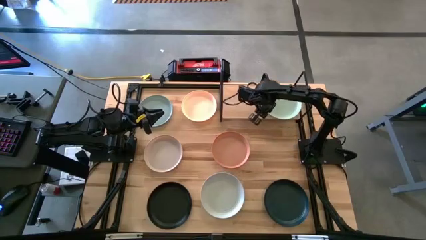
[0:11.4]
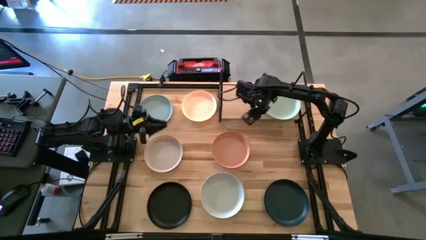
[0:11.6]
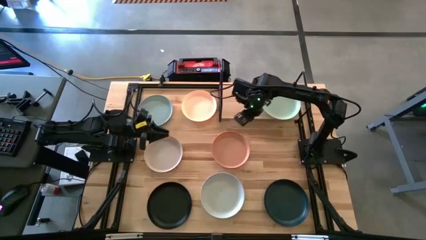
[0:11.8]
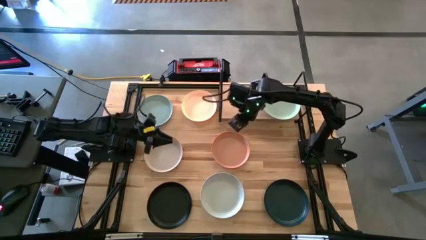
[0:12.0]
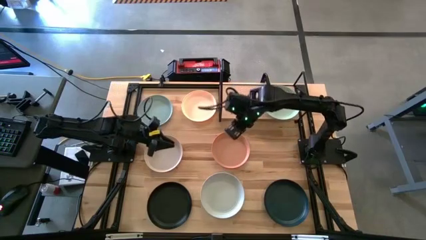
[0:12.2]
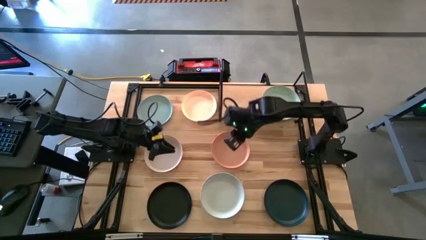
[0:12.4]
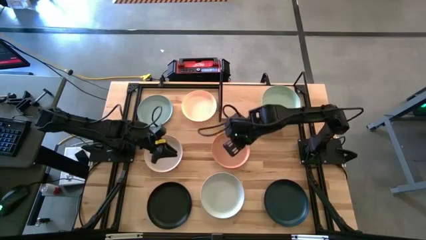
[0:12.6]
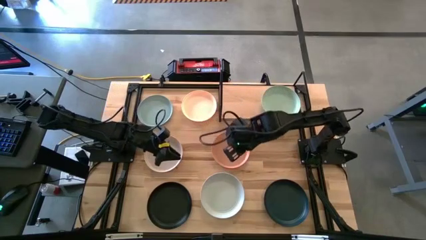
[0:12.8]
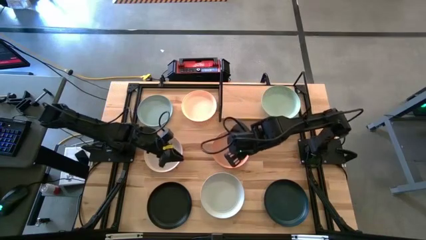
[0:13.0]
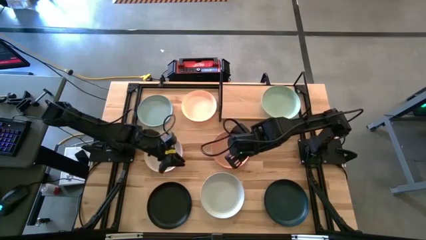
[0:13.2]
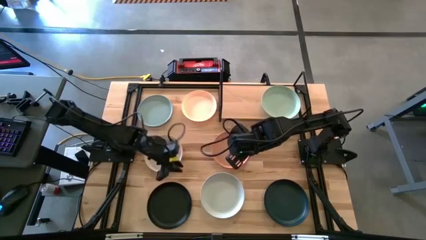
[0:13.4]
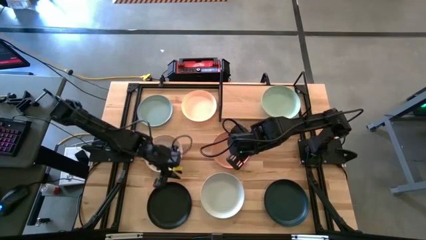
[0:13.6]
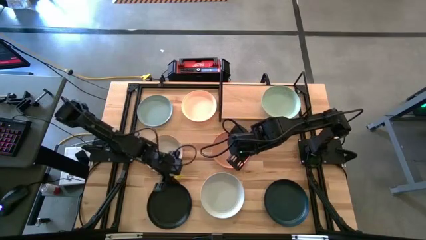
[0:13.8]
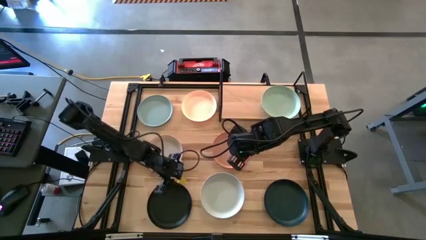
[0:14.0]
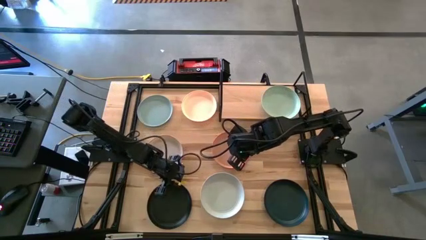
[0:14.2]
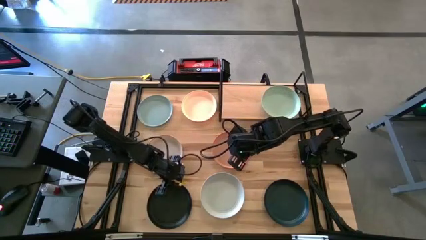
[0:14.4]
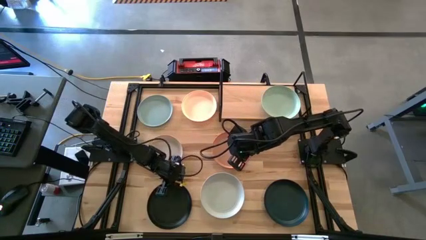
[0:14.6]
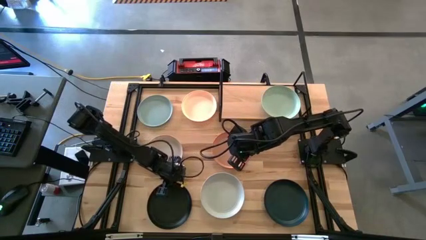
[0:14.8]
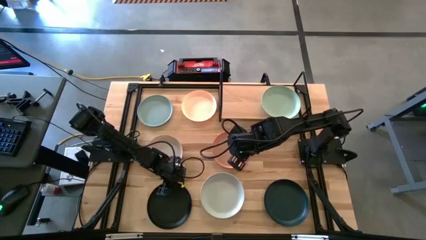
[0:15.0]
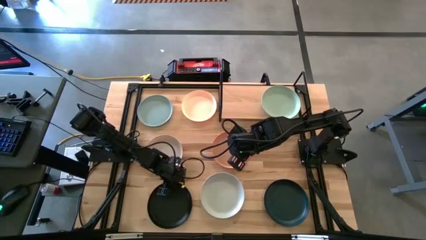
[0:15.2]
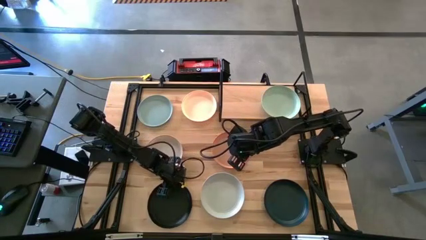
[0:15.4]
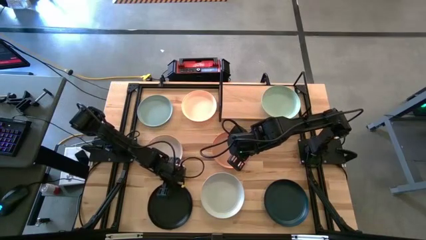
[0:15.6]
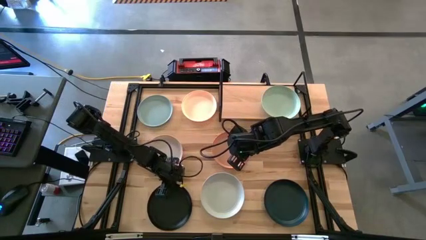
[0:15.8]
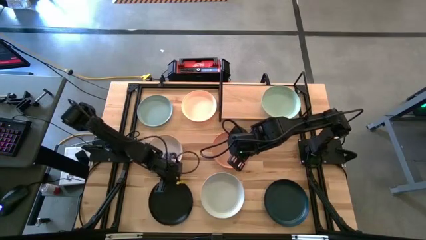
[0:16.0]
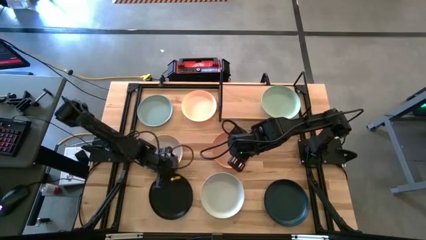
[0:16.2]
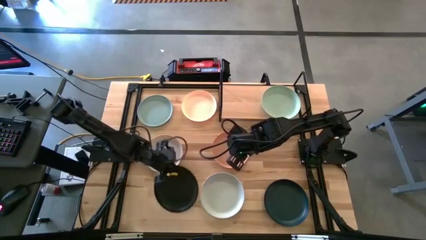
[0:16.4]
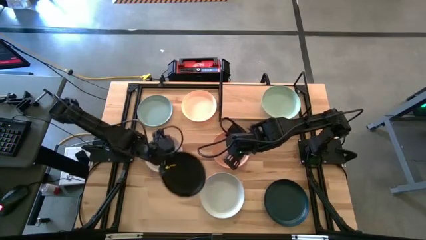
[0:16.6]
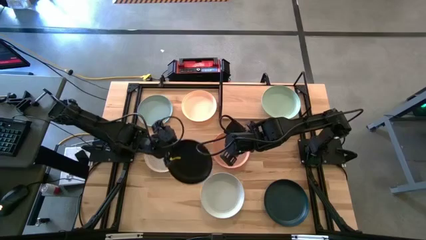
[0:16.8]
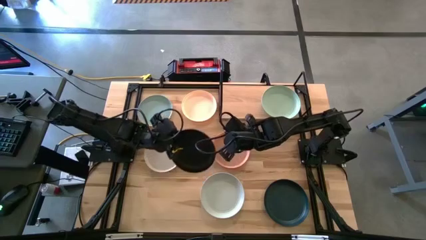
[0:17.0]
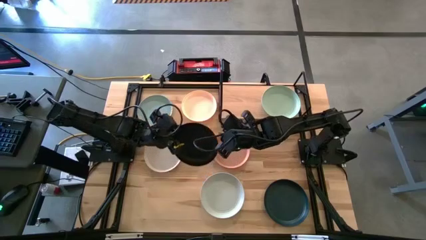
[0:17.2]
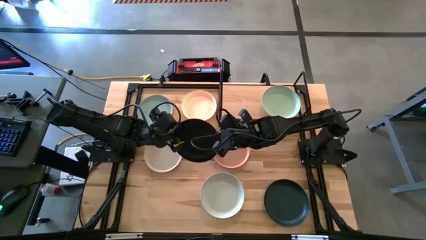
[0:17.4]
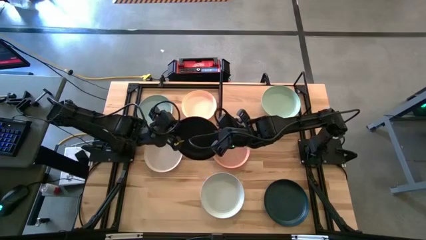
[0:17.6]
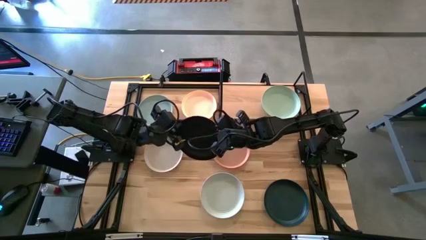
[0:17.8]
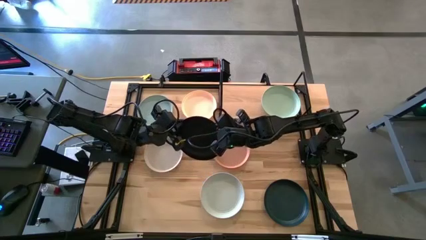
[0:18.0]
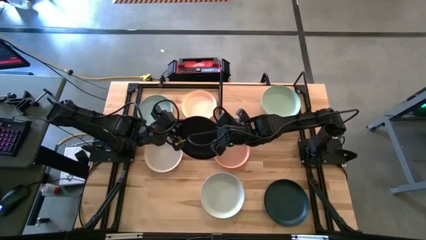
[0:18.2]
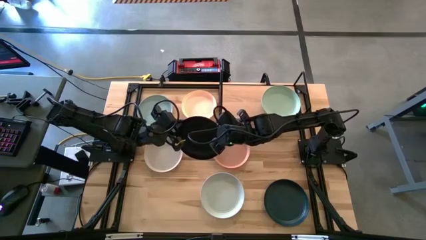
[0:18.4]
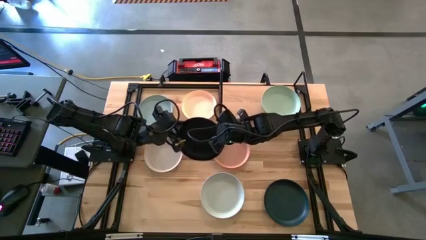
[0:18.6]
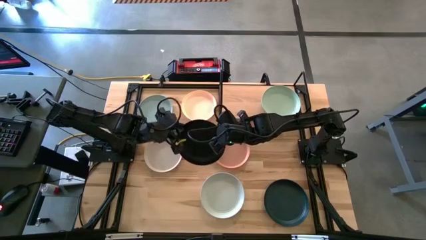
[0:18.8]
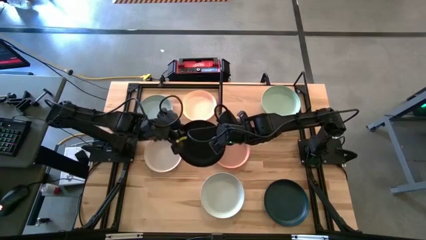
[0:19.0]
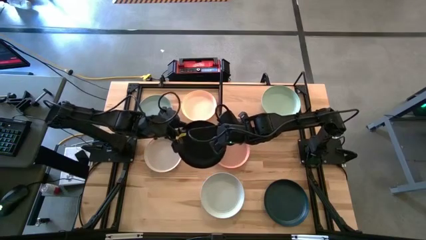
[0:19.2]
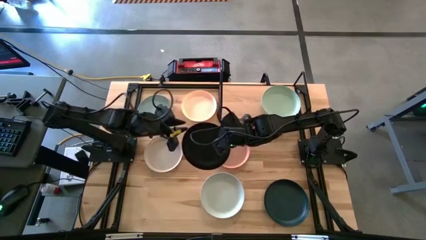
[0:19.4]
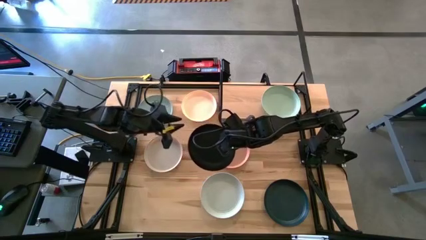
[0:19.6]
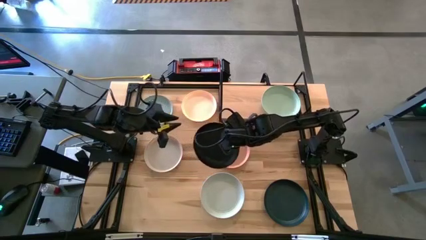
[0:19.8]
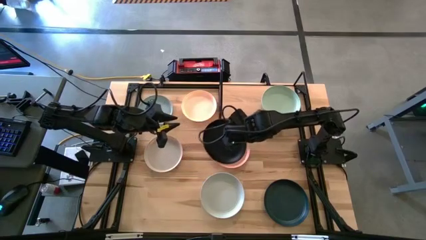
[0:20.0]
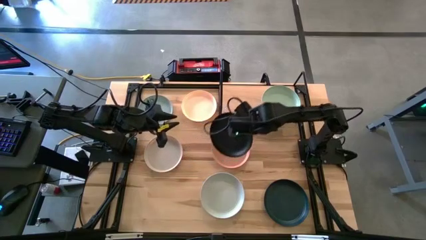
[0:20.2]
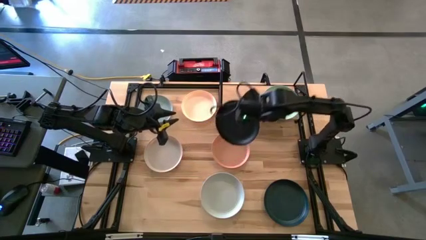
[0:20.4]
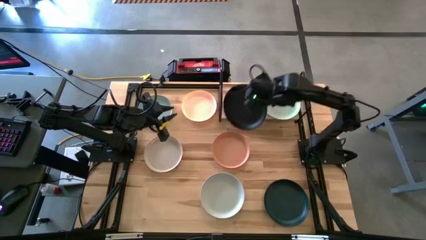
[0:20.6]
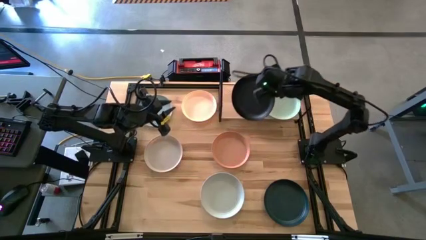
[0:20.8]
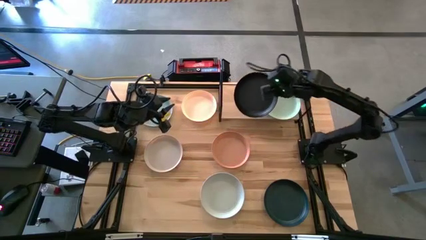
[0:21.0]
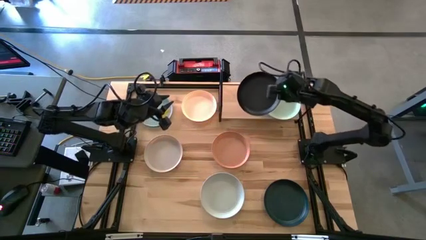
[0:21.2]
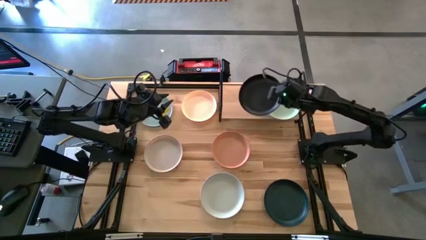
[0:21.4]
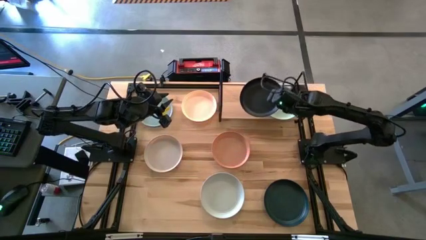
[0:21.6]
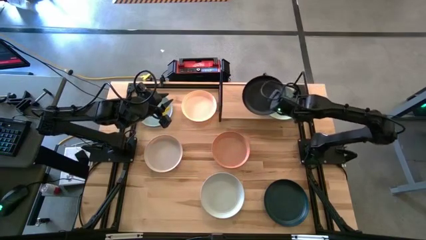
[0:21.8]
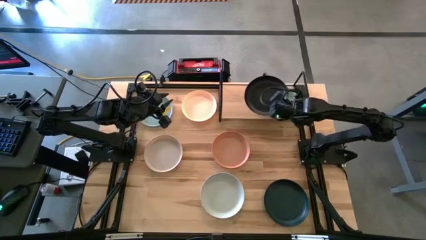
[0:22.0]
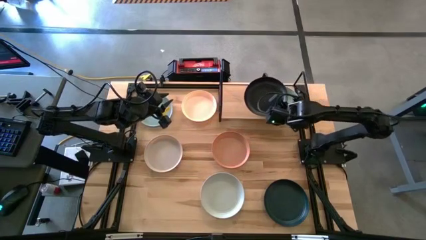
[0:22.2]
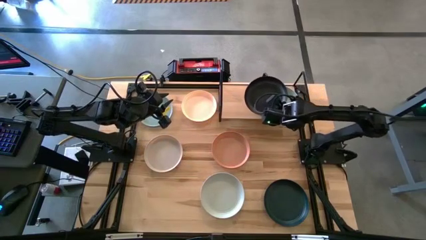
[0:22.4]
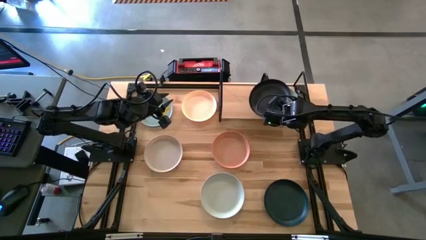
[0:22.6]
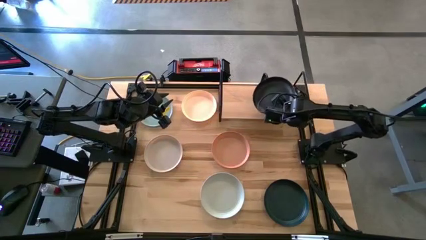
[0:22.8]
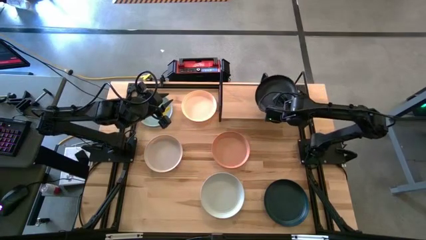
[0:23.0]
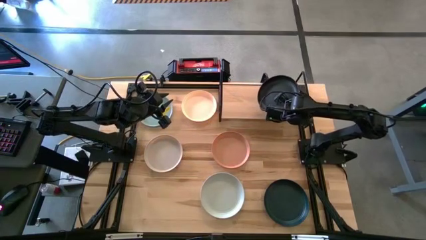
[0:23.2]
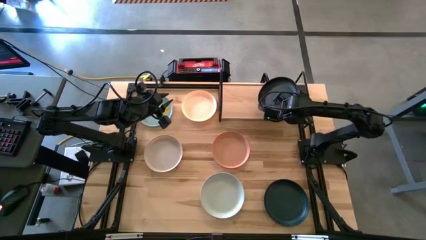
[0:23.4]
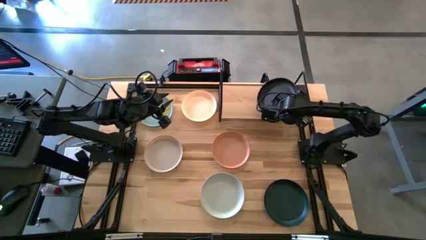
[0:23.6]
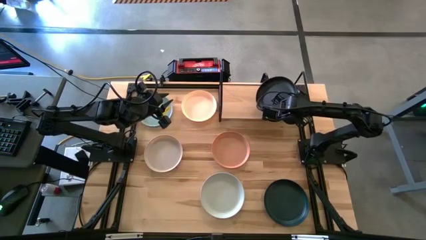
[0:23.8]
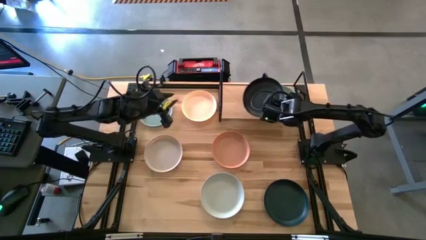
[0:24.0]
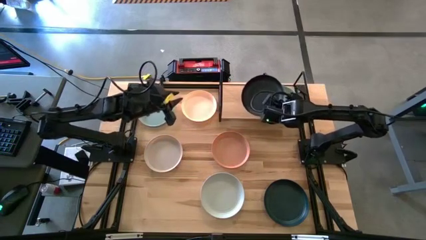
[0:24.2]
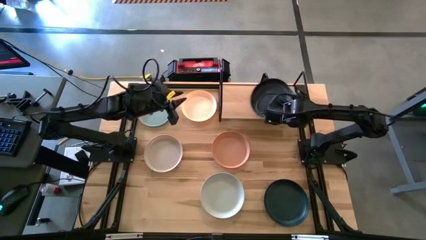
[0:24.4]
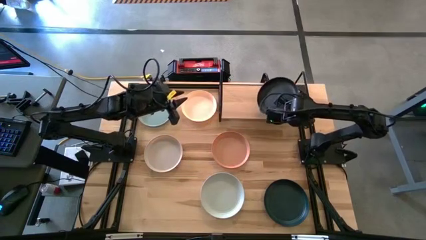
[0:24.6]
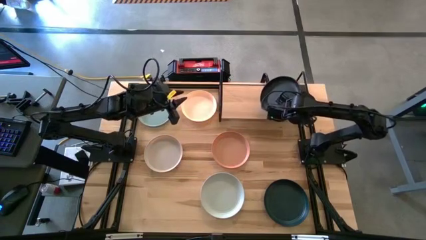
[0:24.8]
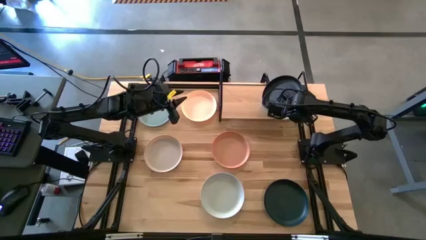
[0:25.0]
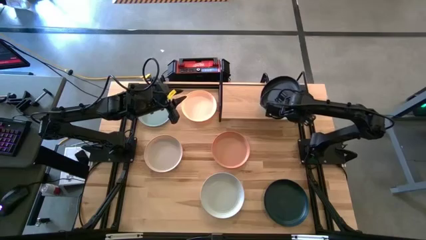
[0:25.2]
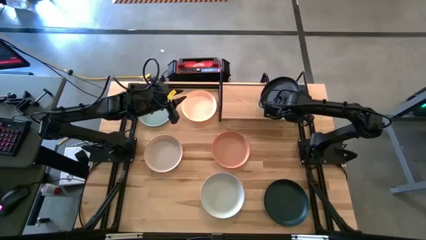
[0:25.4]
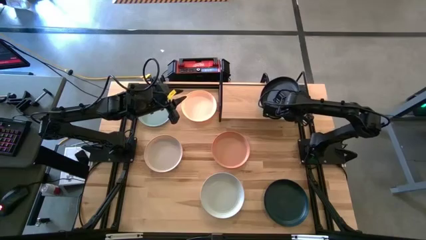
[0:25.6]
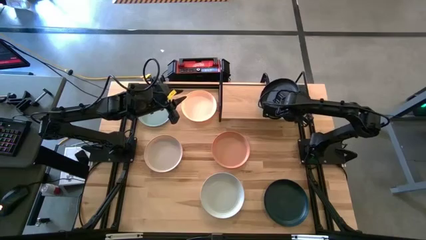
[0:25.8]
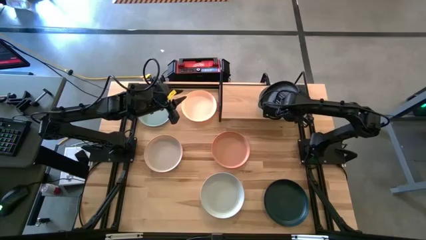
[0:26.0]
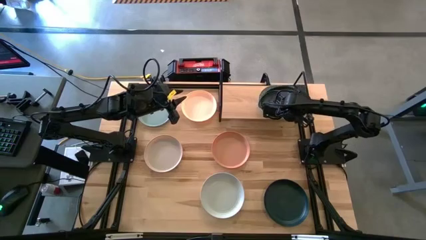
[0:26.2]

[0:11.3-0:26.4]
Task: Place and stack plates onto a shelf
Stack the black plate on top of the light green plate
